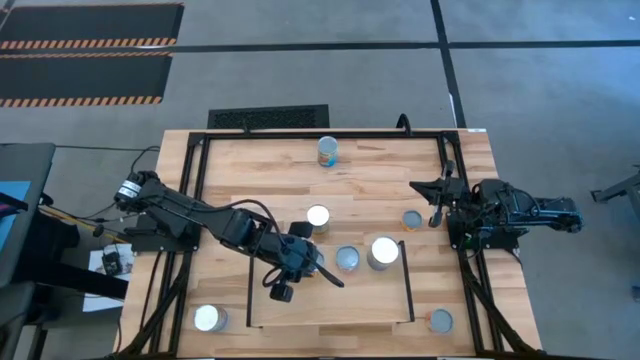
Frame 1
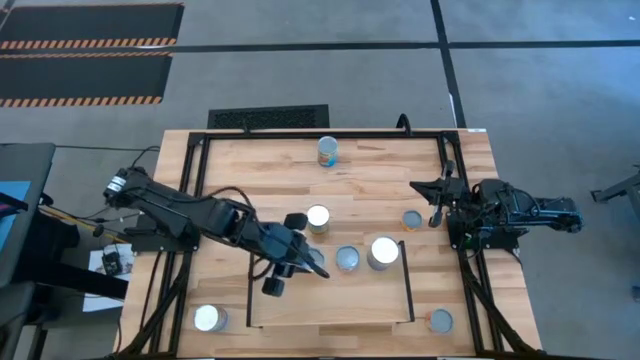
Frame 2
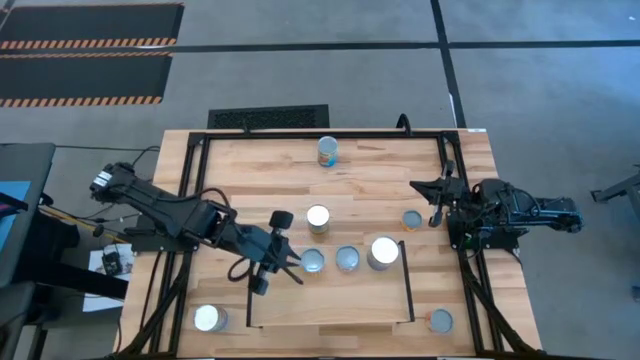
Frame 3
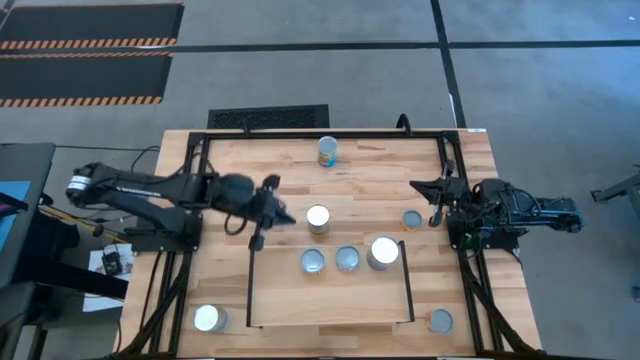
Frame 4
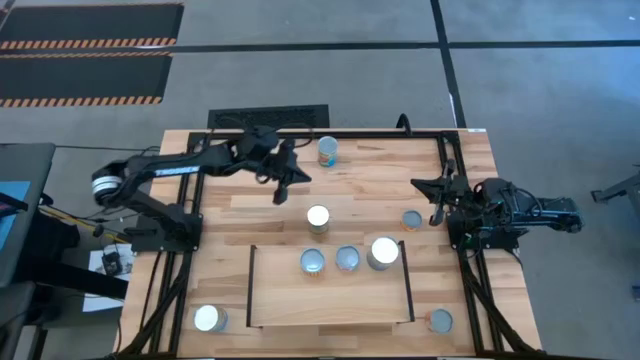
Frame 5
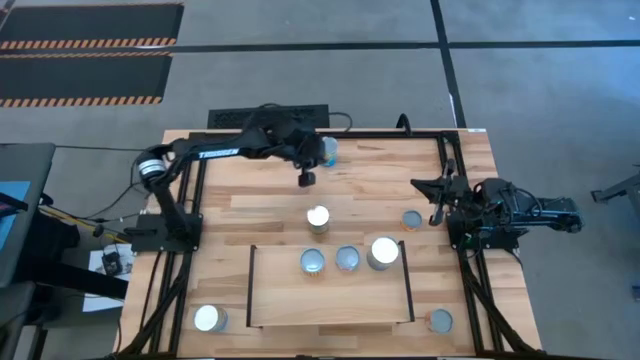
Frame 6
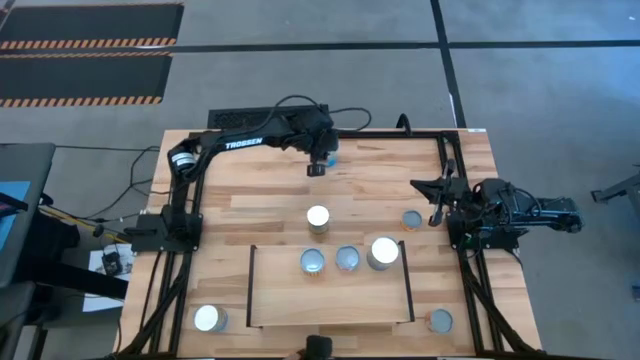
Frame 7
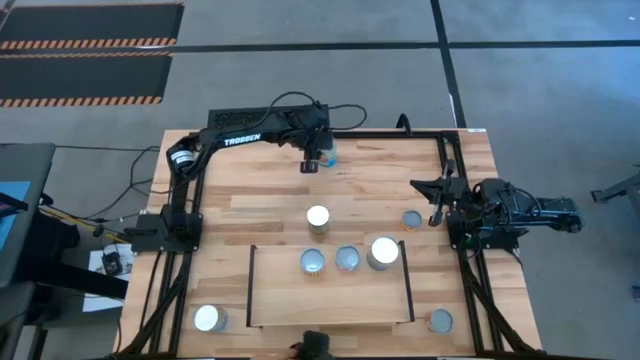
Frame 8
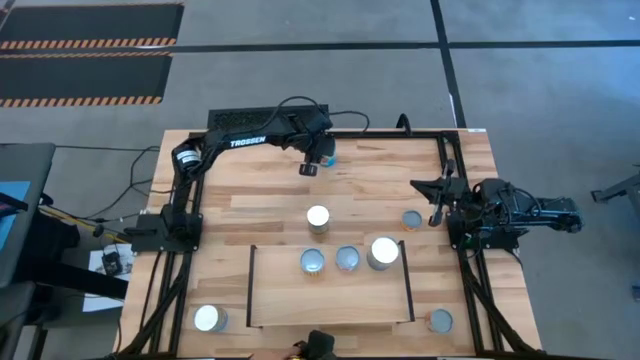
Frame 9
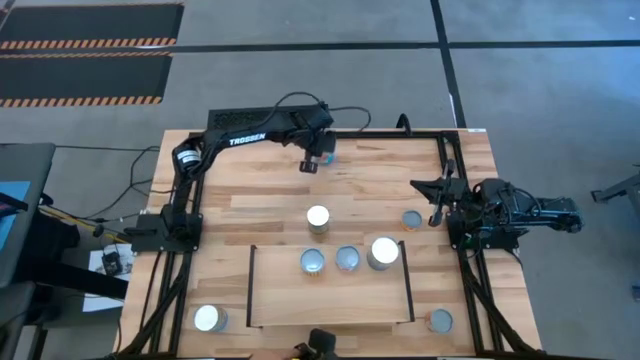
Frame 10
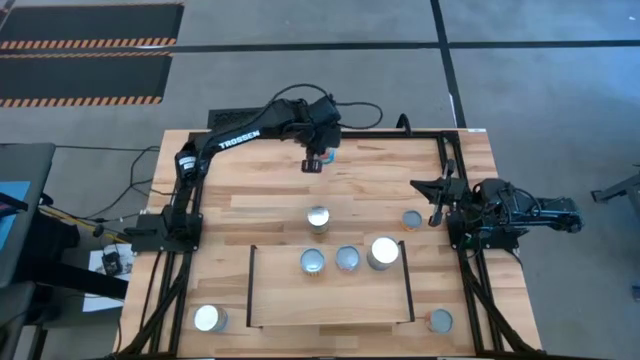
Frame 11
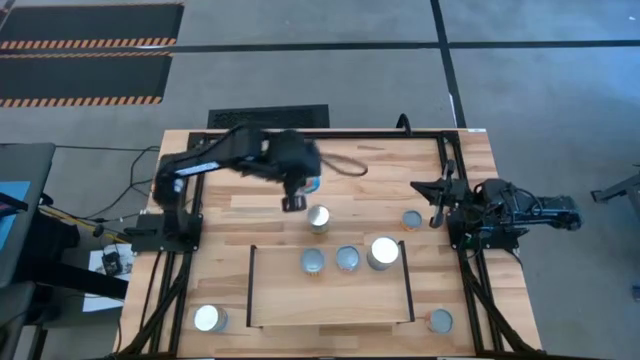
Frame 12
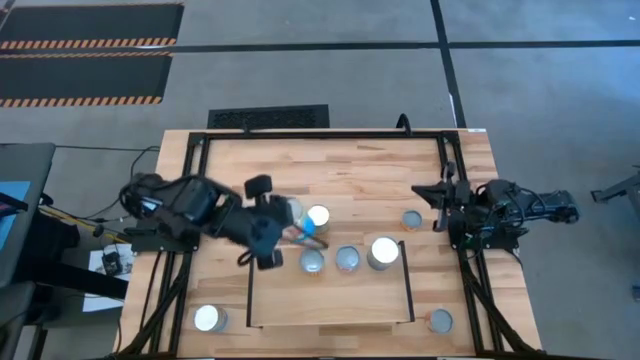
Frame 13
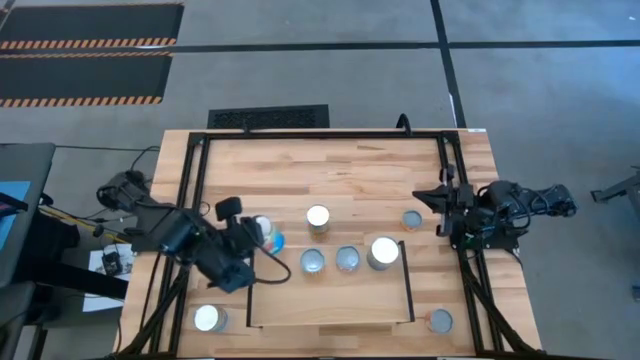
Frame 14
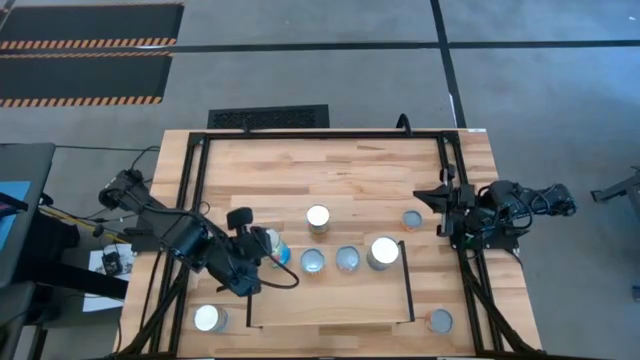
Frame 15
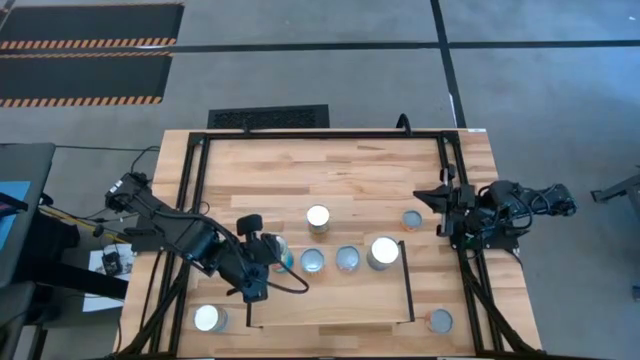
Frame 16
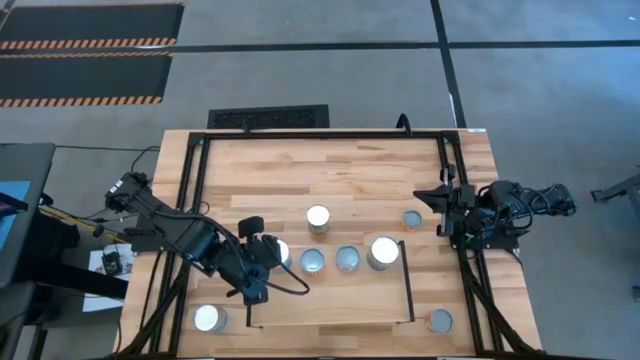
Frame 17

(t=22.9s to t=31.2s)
Task: Pick and place cans onto a shelf
Put the top canned tomatoes on the shelf

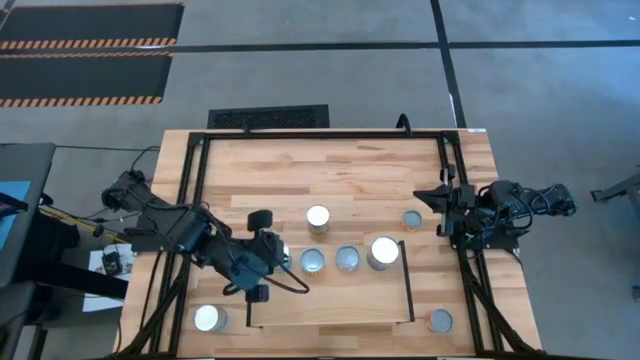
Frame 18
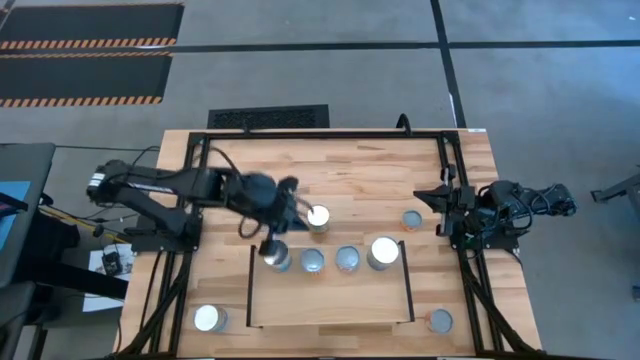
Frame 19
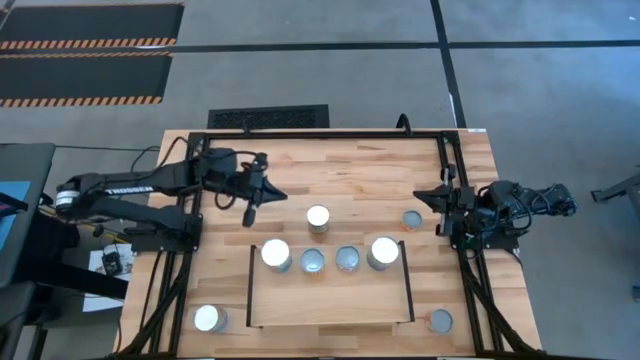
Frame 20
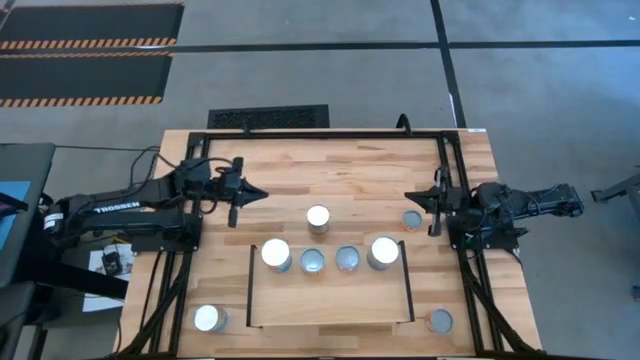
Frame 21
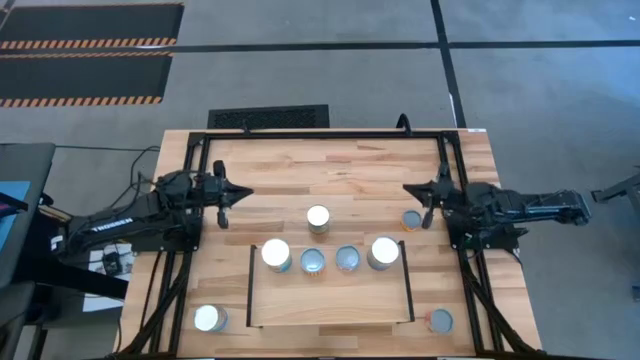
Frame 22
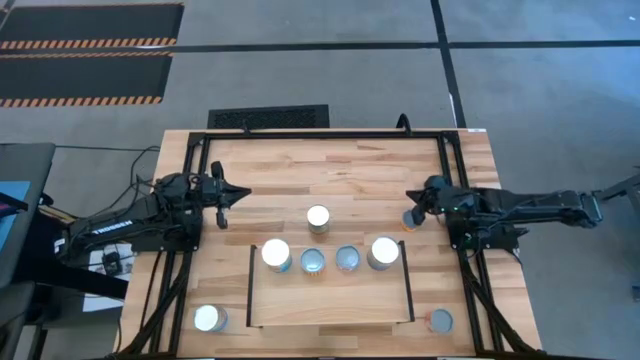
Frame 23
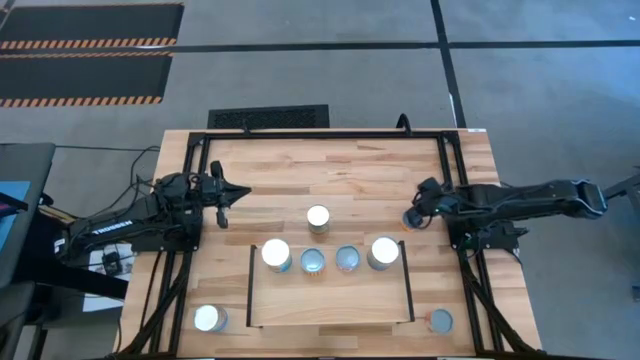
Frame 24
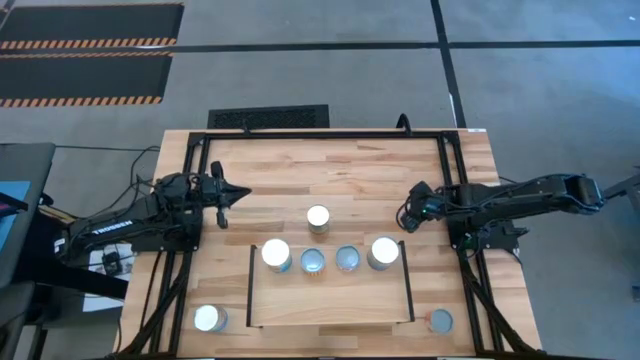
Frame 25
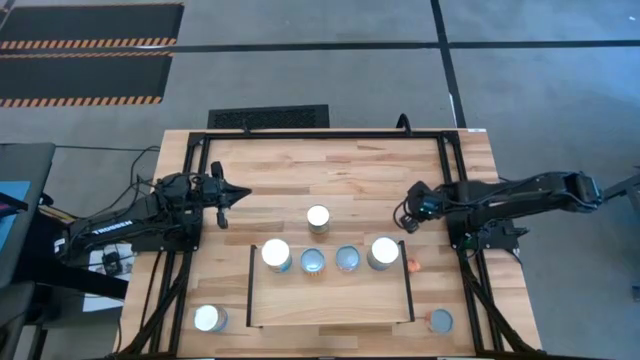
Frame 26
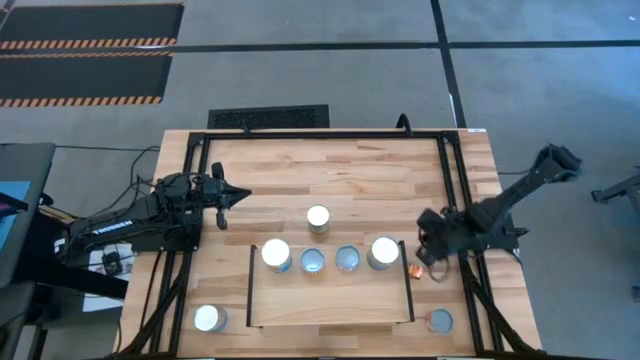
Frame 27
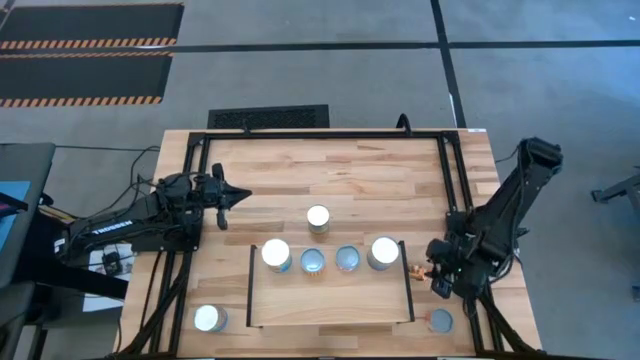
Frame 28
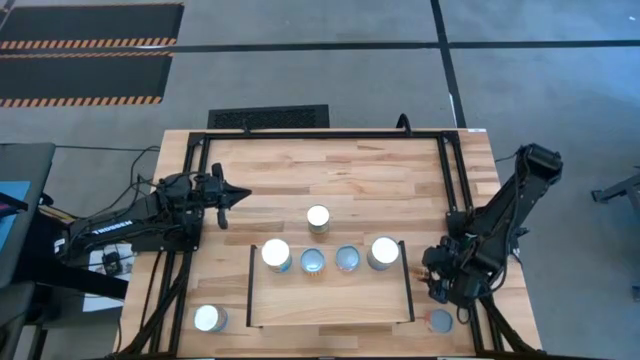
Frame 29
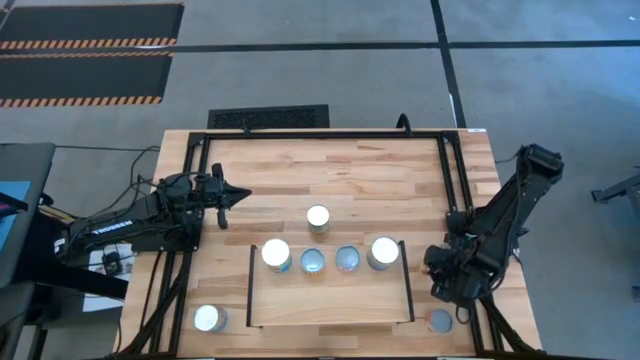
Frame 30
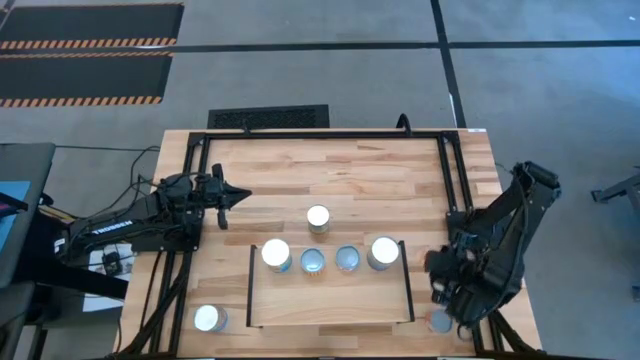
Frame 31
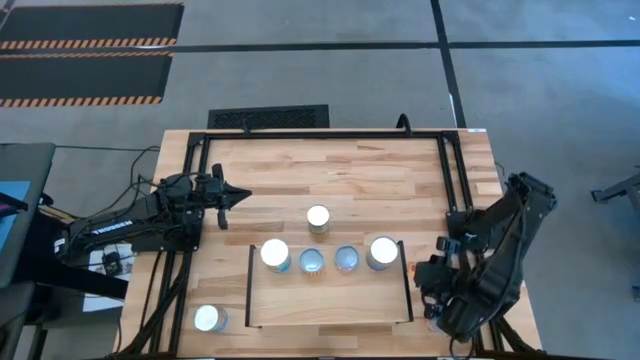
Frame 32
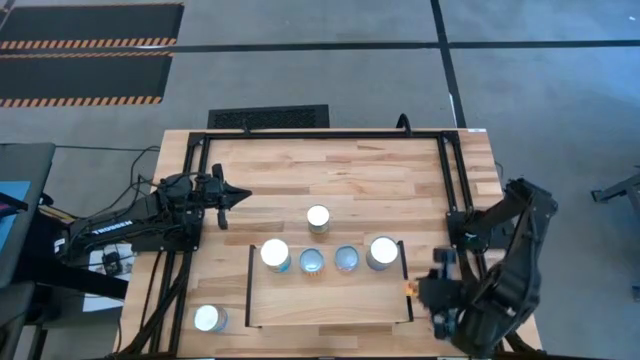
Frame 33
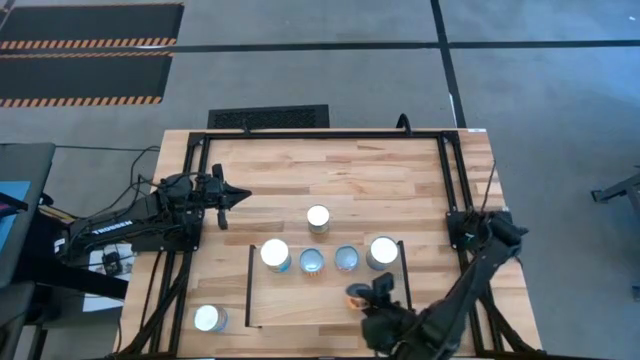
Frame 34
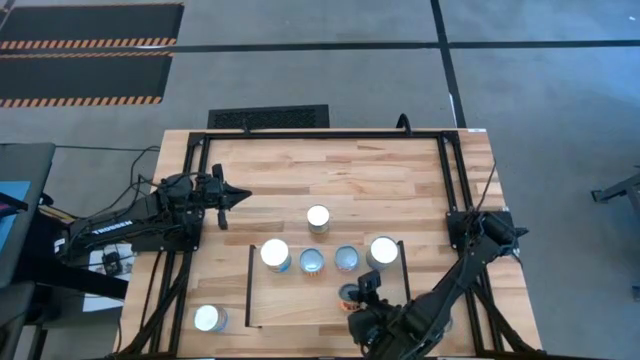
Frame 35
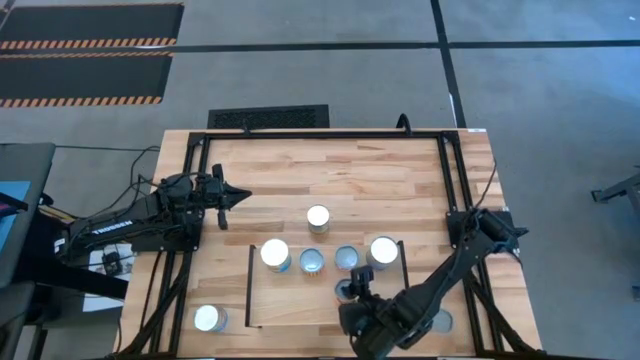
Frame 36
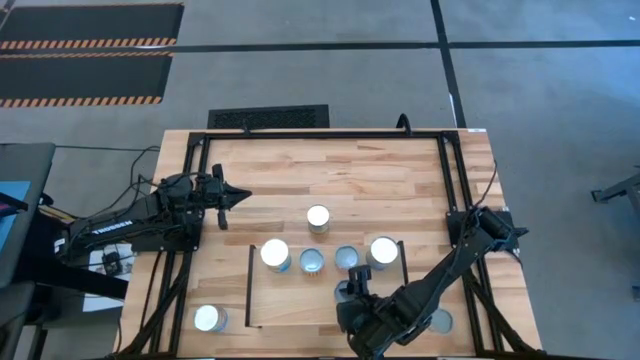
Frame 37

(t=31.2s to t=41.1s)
Put the canned pineapple rings on the shelf

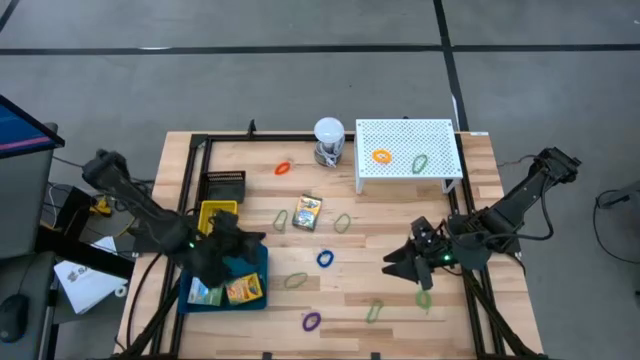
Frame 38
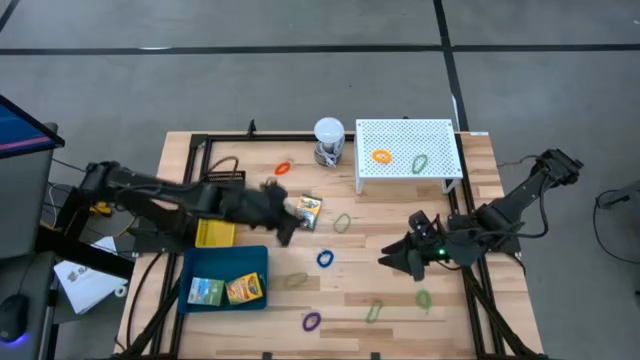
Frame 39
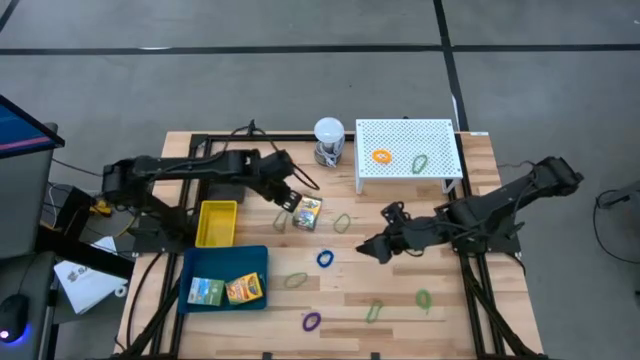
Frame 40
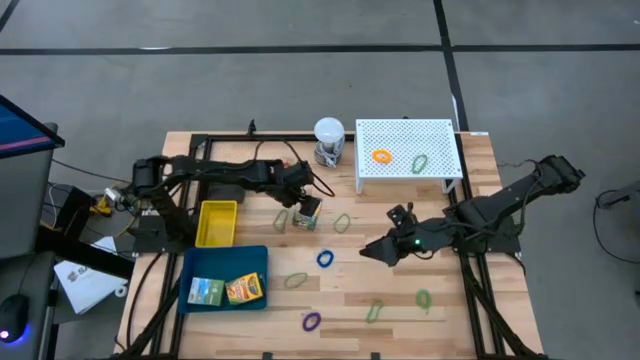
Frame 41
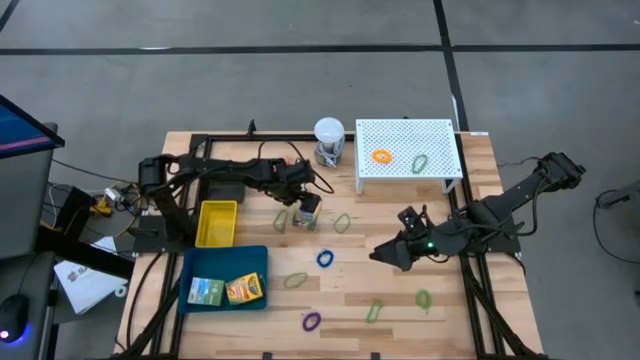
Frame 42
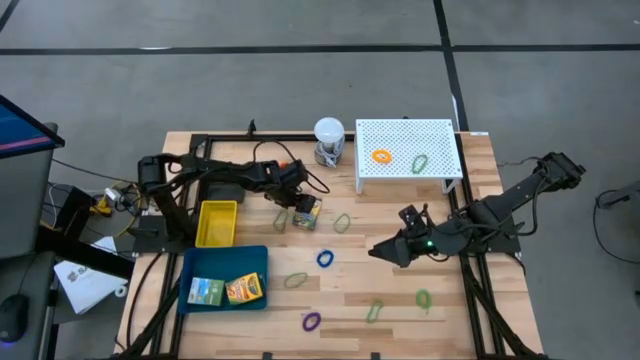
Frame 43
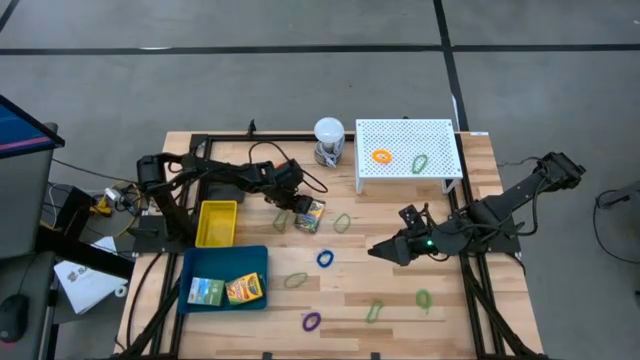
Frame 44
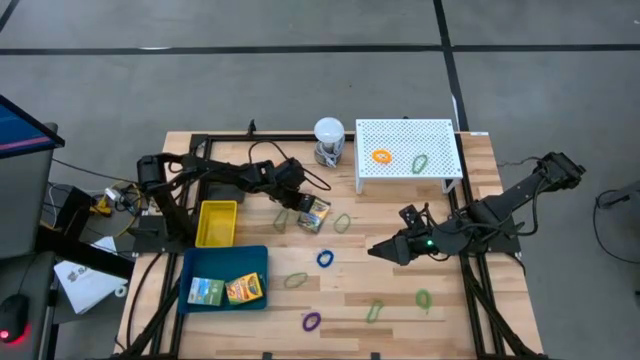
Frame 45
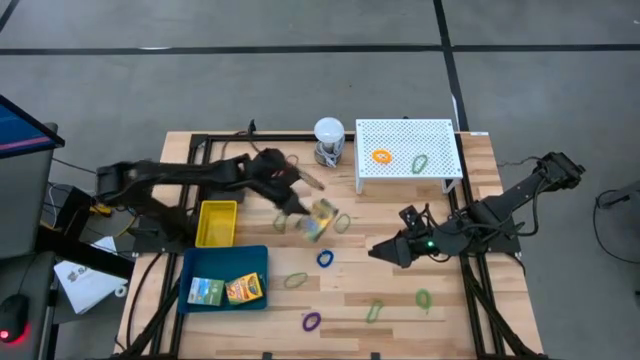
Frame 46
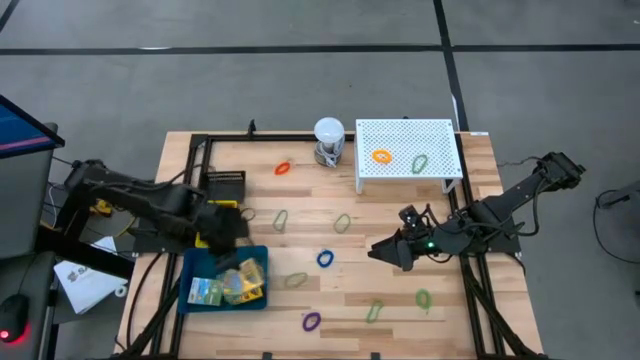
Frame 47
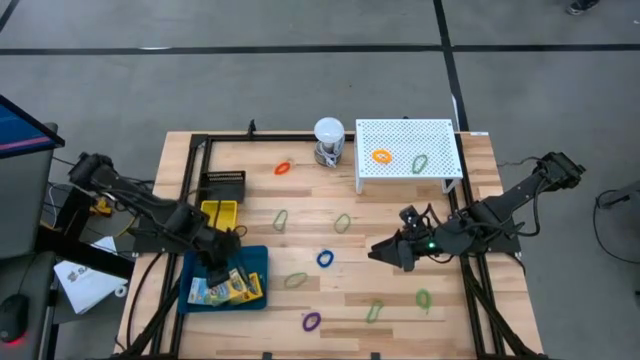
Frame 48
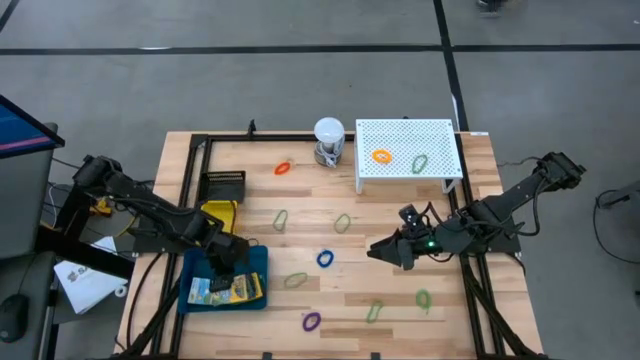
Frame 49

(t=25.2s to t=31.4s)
Task: Pick & Place Office Desk Supplies
Put the crayon box into the blue bin
